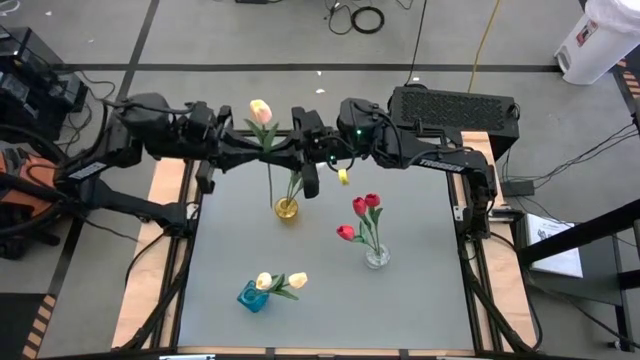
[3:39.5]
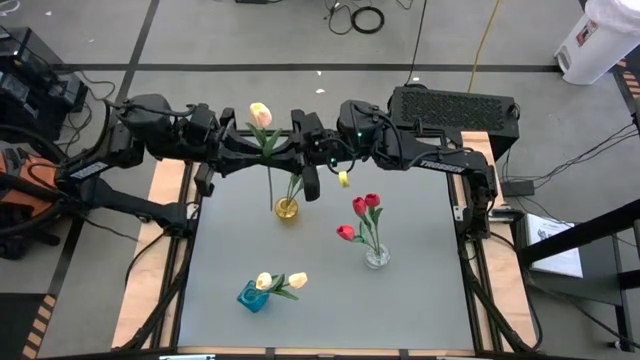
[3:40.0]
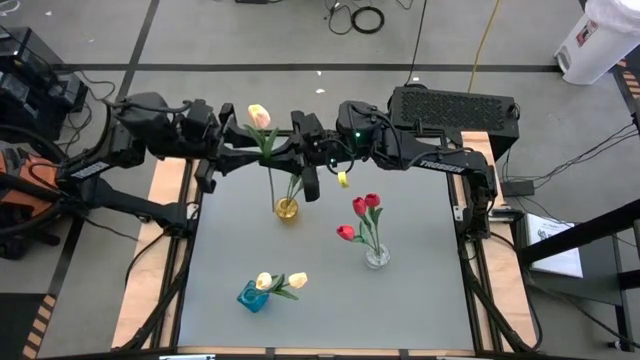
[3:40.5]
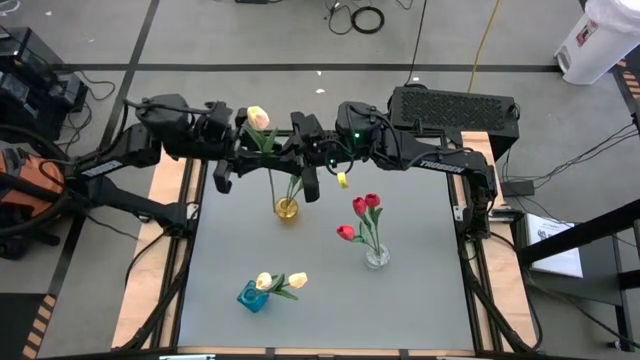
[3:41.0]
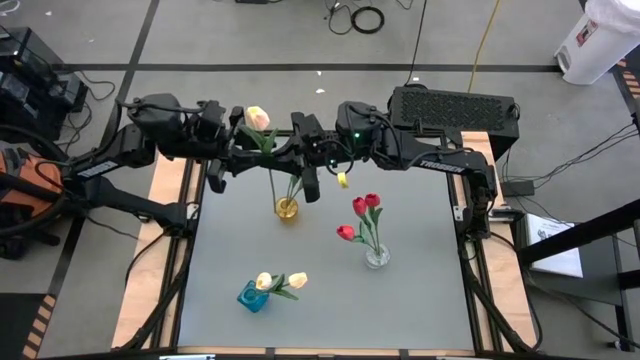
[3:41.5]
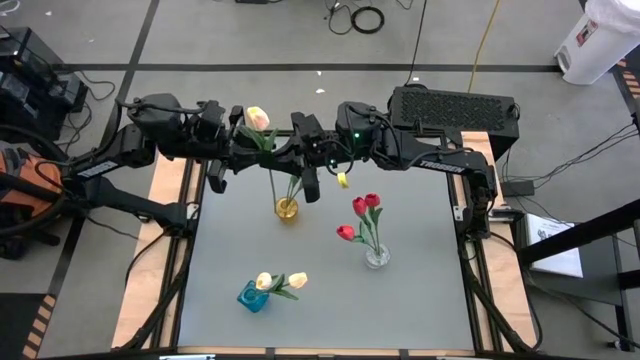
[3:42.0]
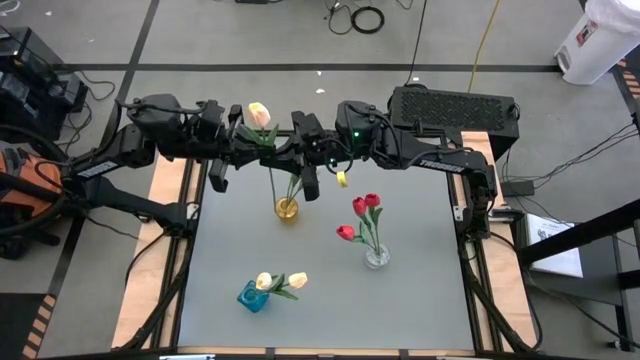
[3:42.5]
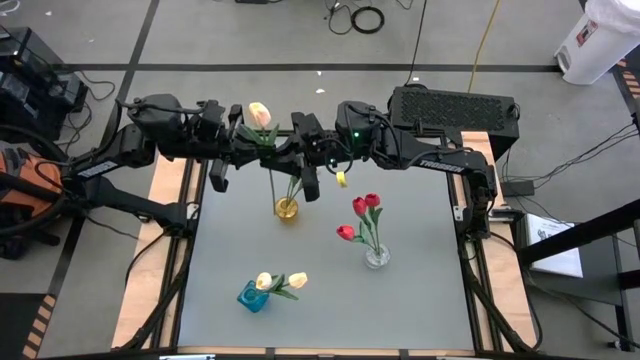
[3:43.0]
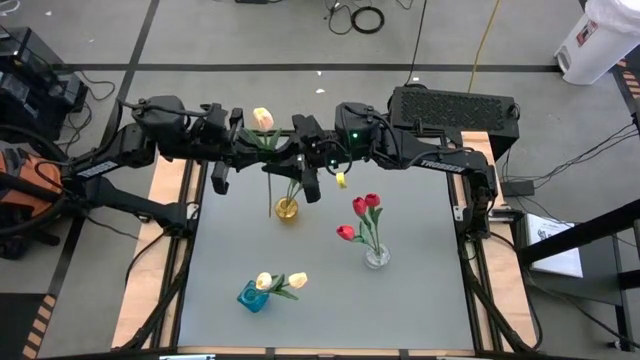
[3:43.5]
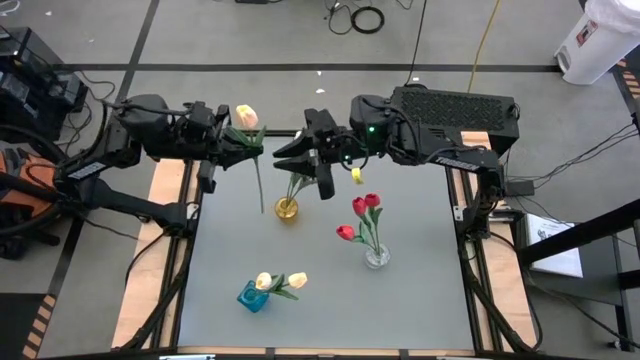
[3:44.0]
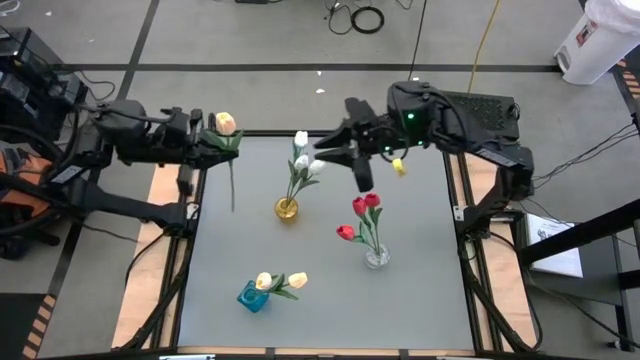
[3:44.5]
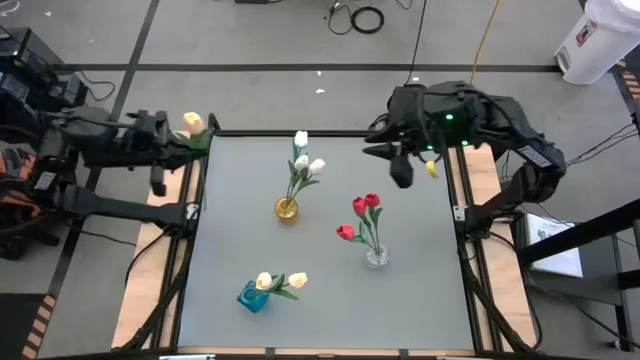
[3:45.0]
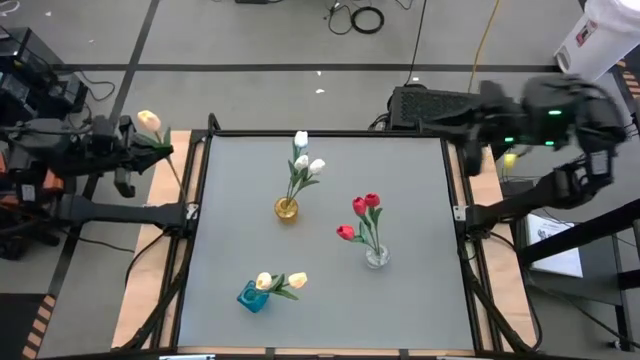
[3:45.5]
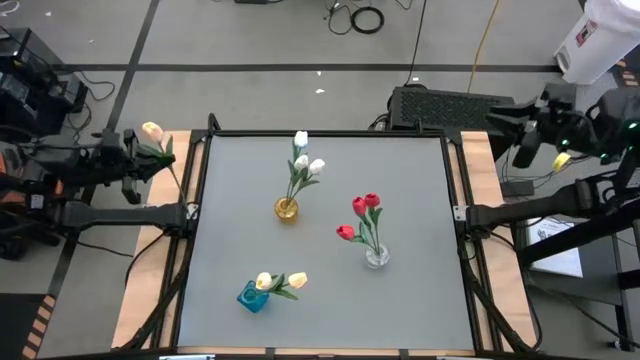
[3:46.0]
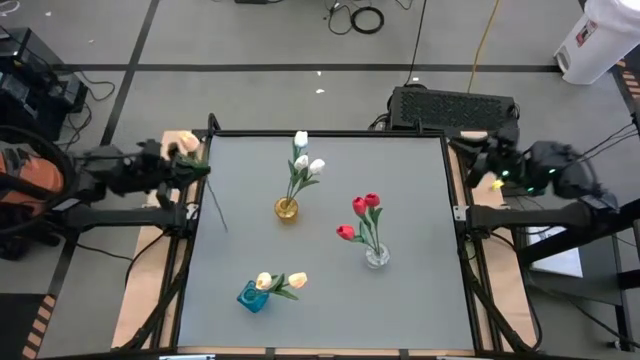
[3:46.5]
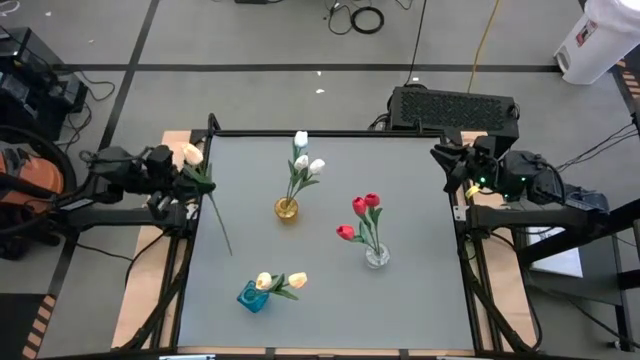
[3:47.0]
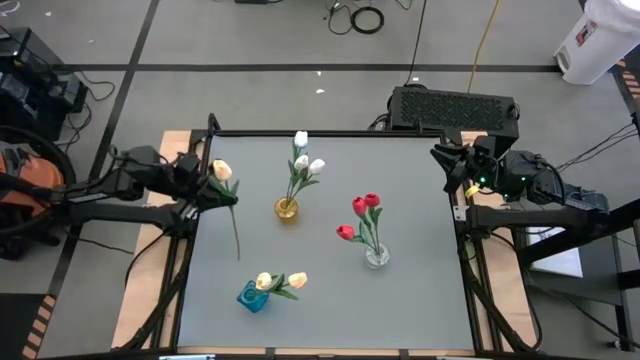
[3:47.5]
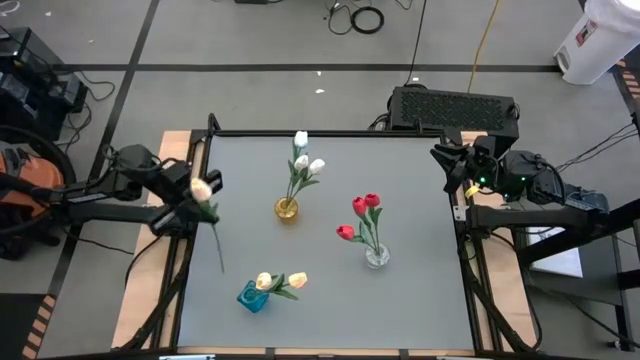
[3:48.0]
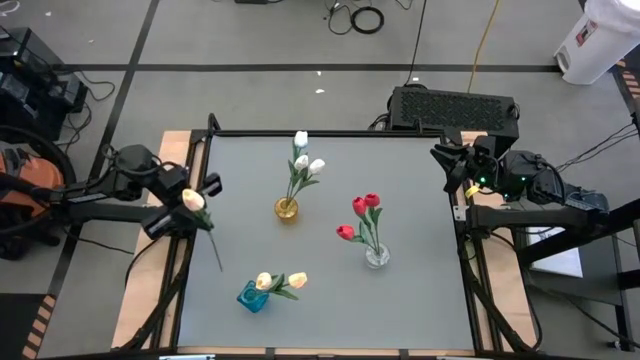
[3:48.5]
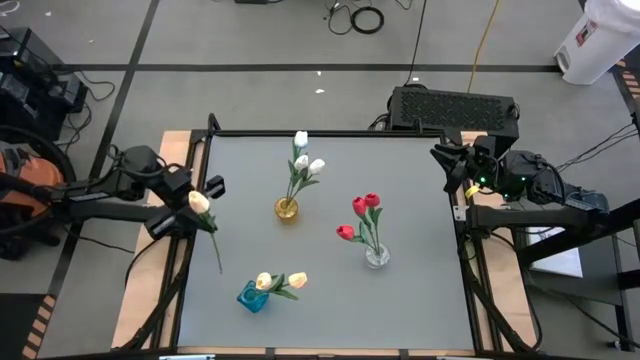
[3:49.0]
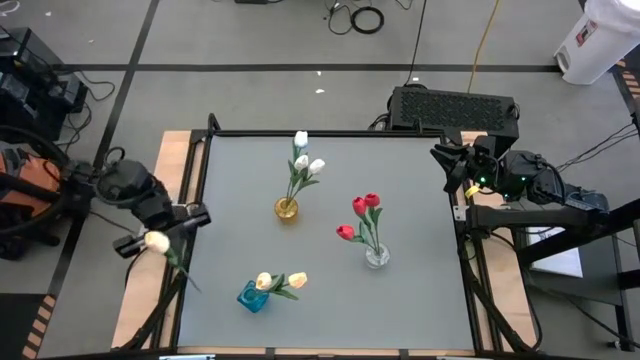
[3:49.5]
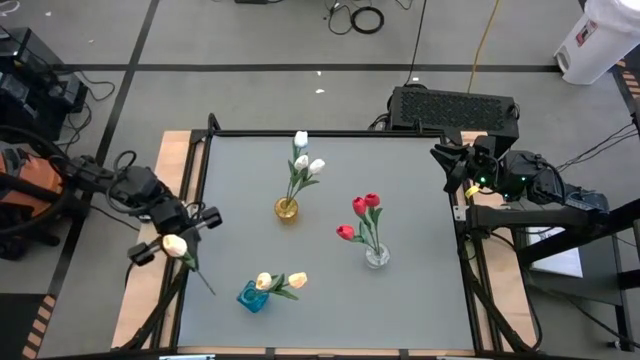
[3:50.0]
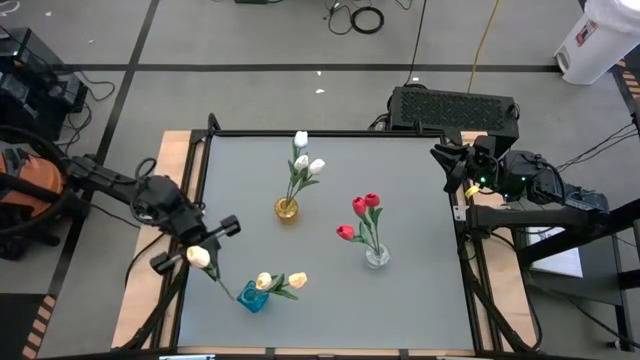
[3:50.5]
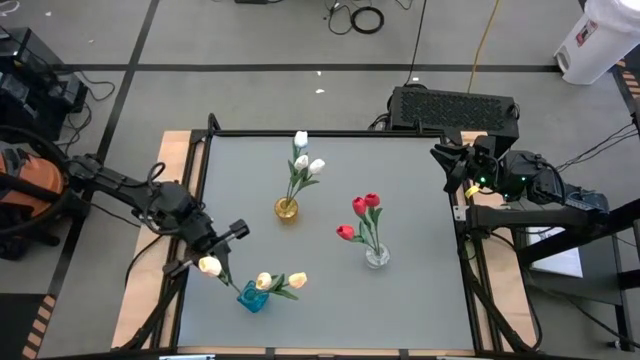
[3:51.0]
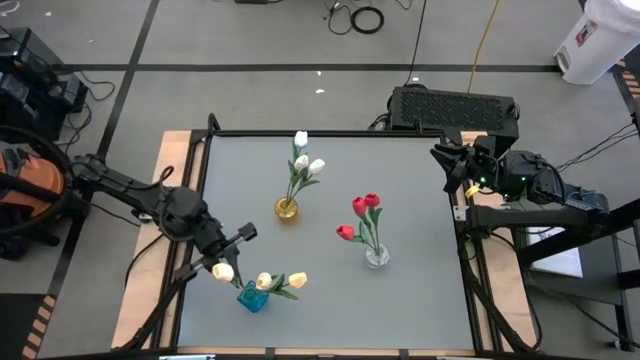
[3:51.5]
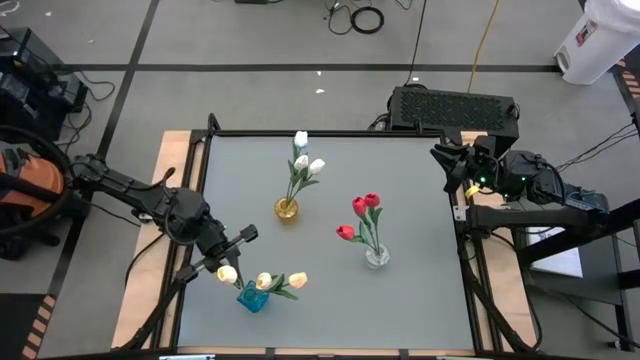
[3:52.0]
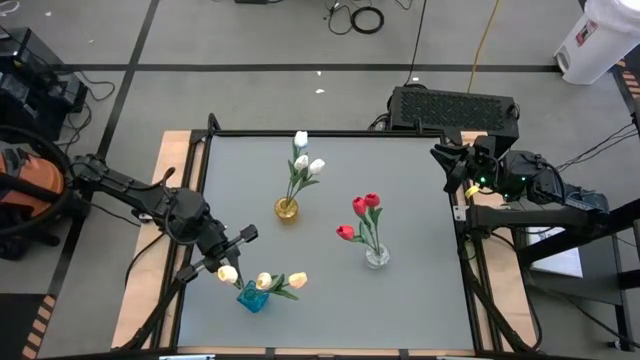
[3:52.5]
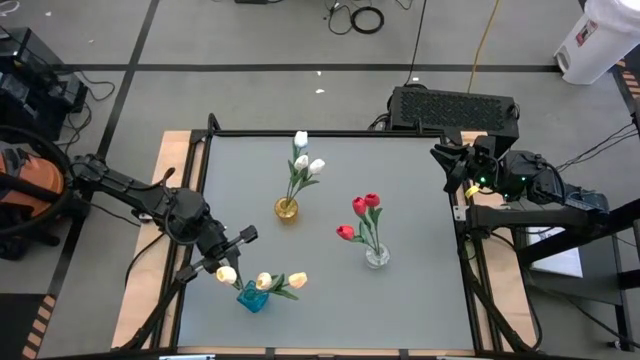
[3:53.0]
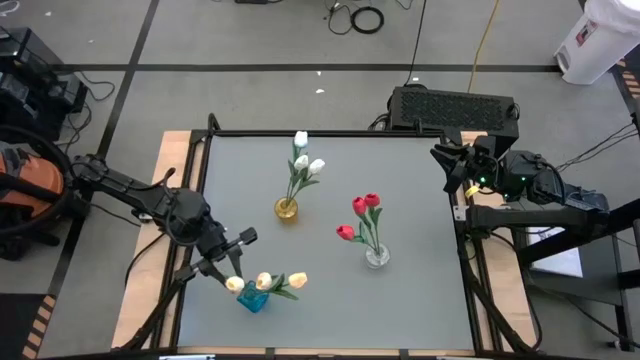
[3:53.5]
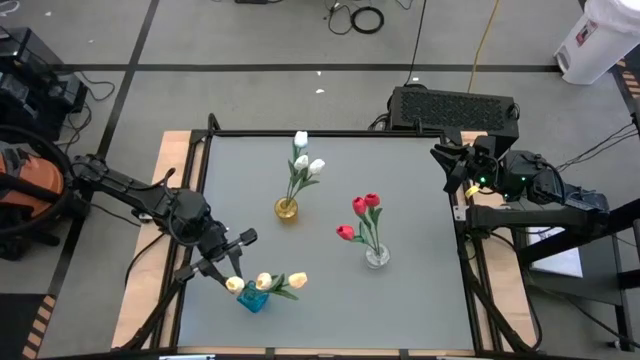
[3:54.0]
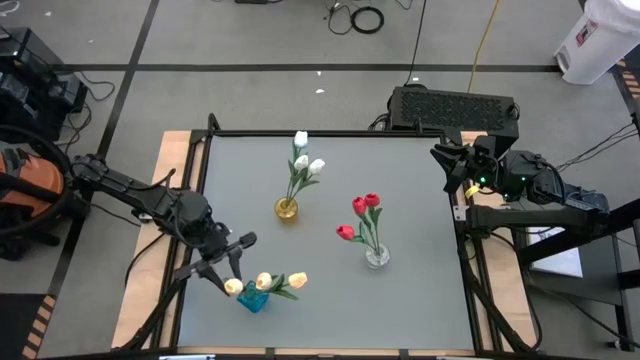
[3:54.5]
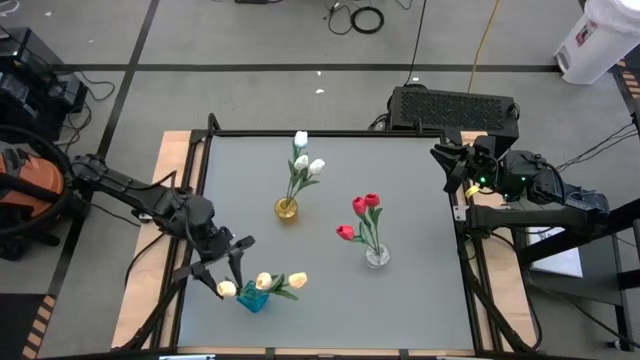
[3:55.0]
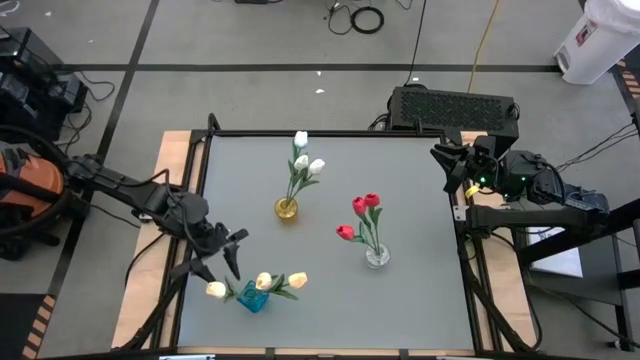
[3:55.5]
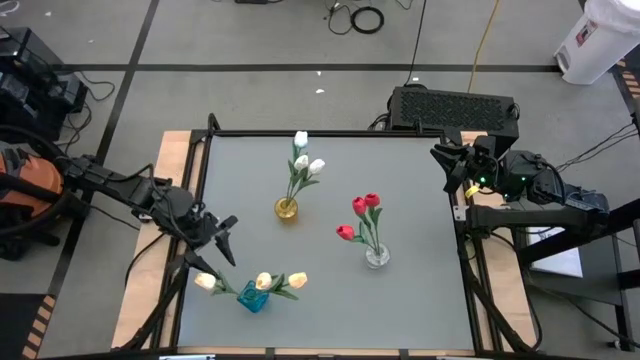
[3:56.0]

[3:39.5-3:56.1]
Task: Sort flowers into vase by color
Put the yellow tulip into the blue vase

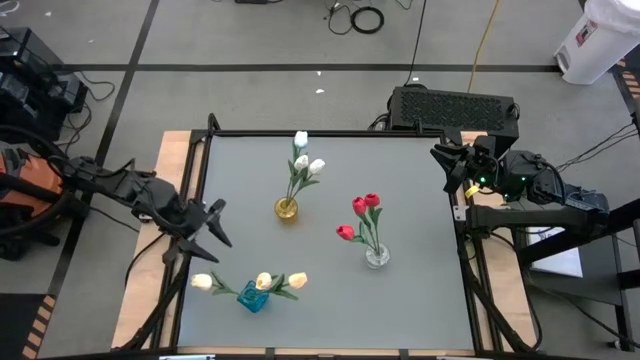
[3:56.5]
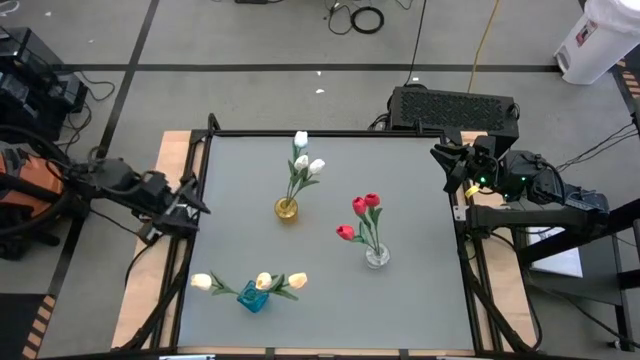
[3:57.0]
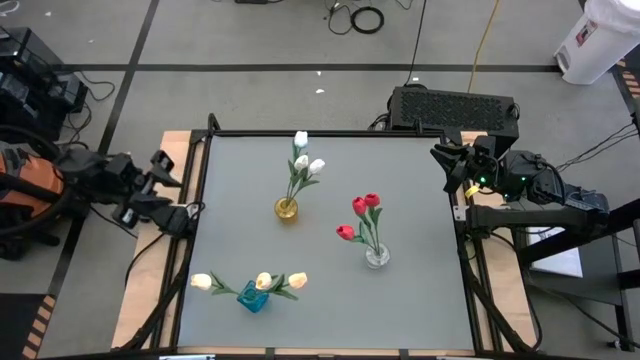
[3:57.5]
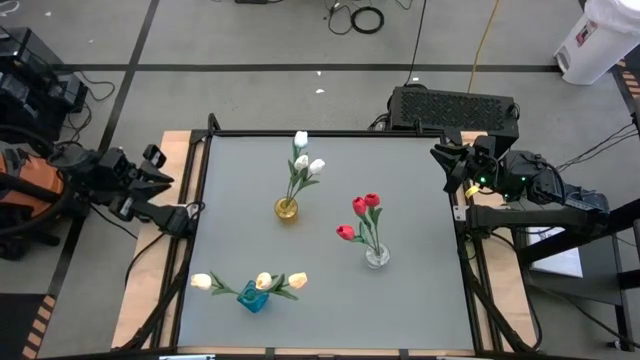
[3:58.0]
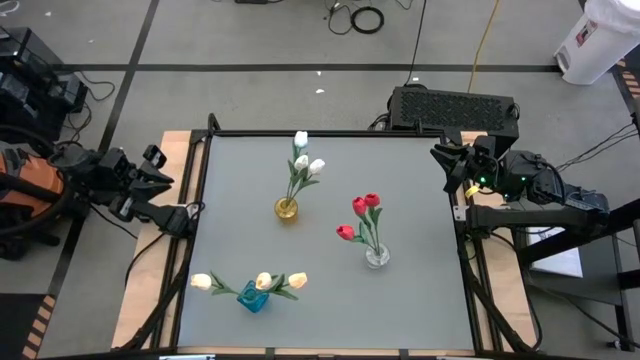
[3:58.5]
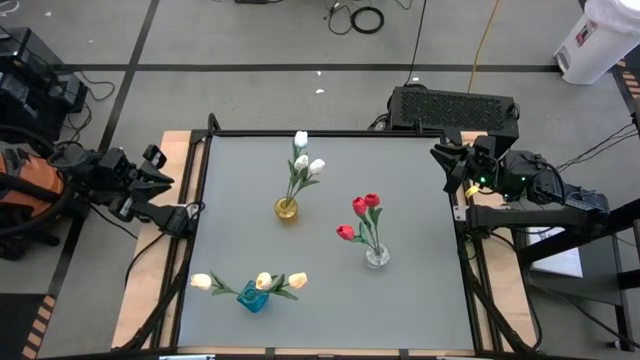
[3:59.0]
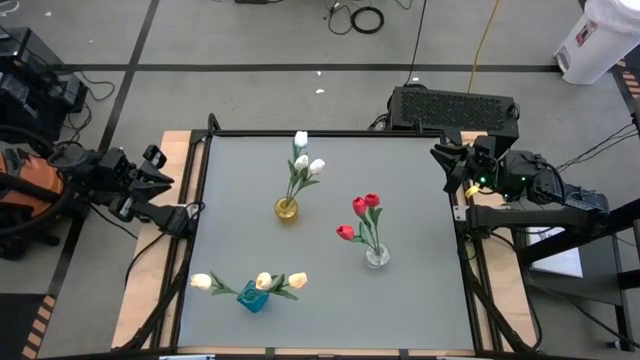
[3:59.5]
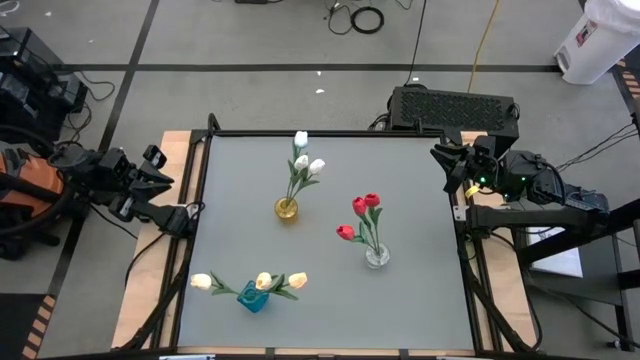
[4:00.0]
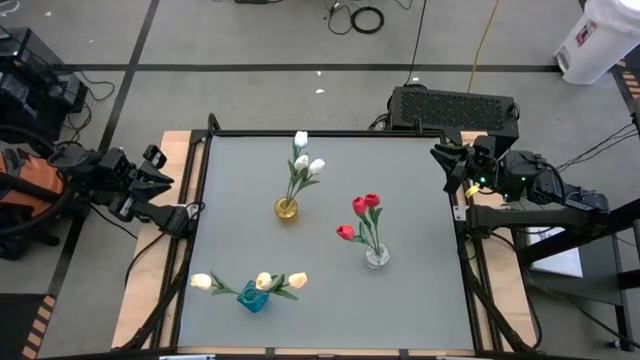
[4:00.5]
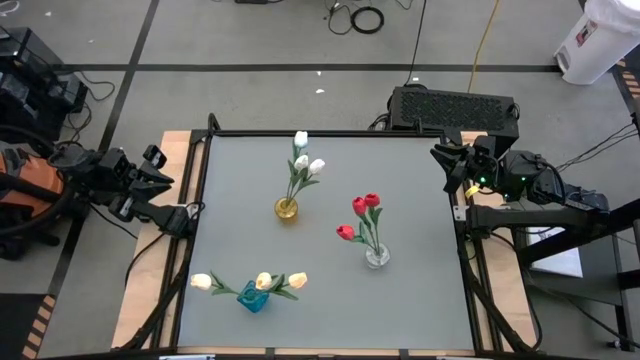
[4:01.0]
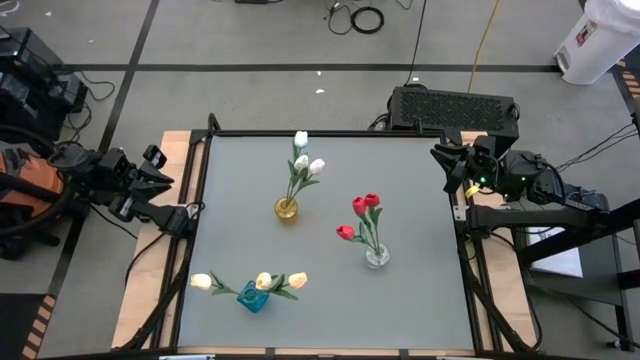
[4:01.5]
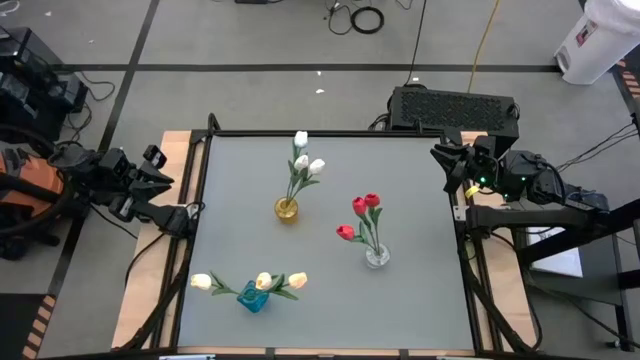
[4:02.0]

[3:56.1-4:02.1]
Return to Home Position
